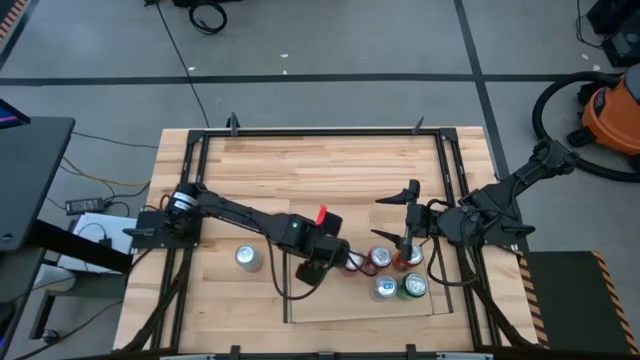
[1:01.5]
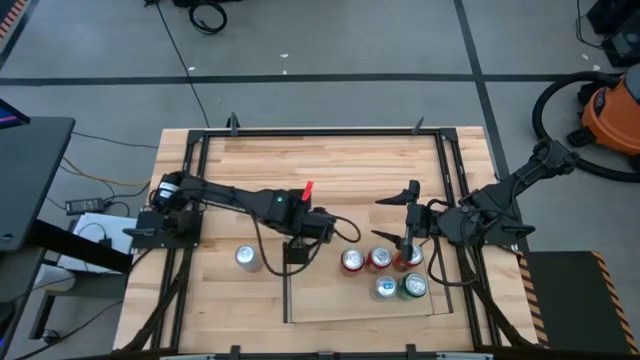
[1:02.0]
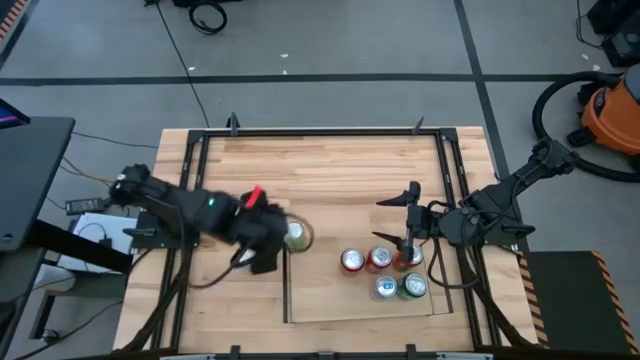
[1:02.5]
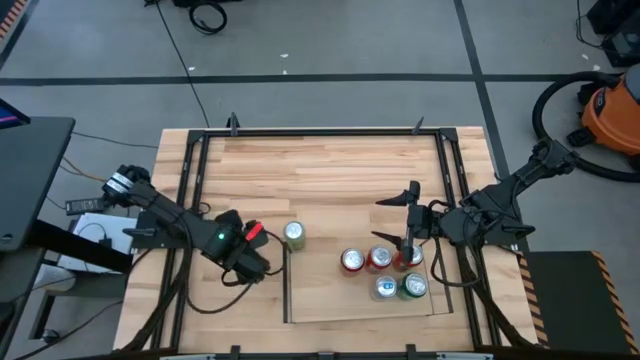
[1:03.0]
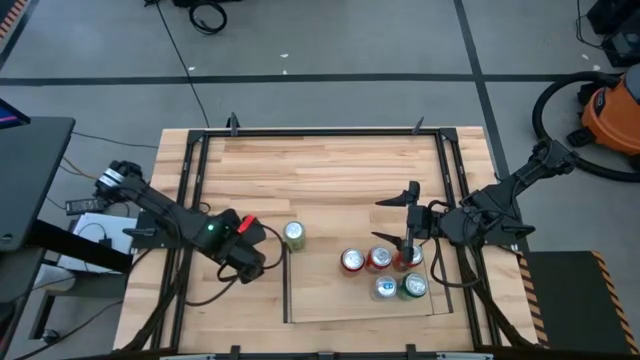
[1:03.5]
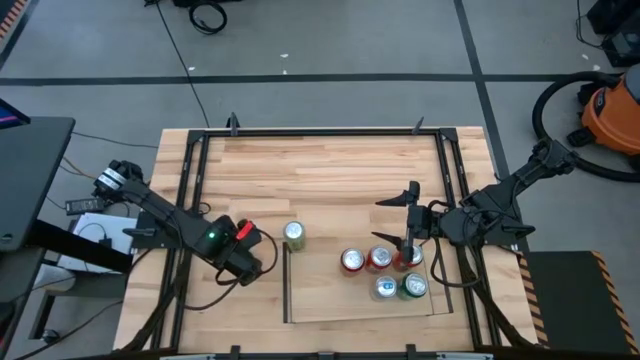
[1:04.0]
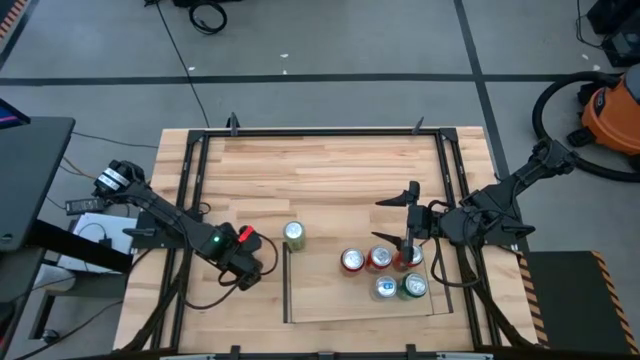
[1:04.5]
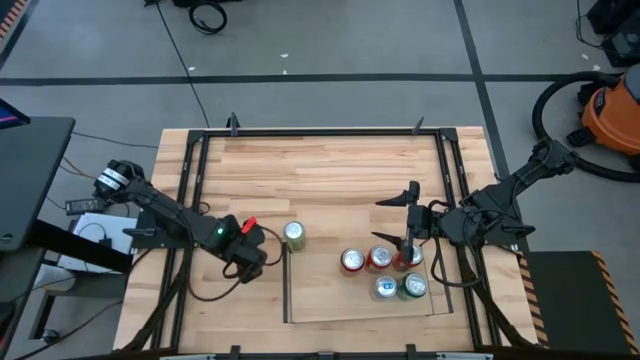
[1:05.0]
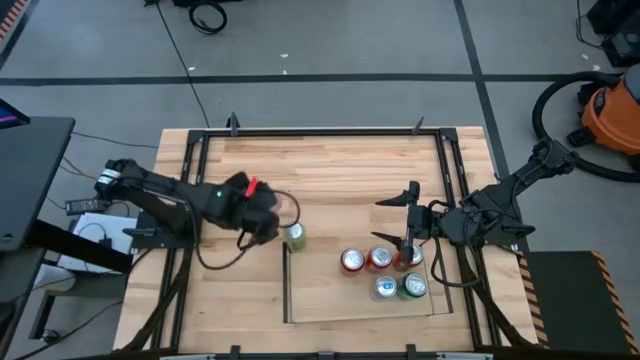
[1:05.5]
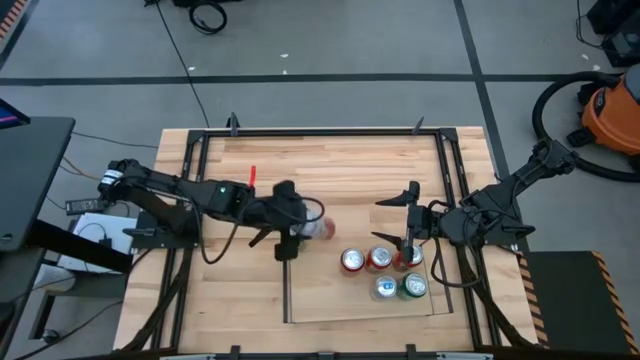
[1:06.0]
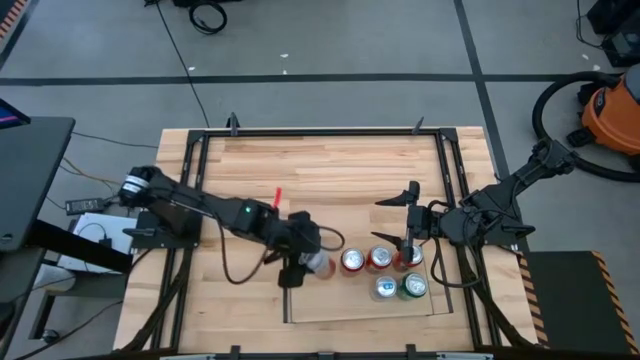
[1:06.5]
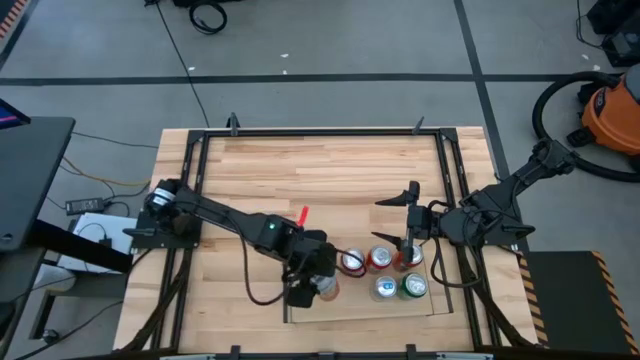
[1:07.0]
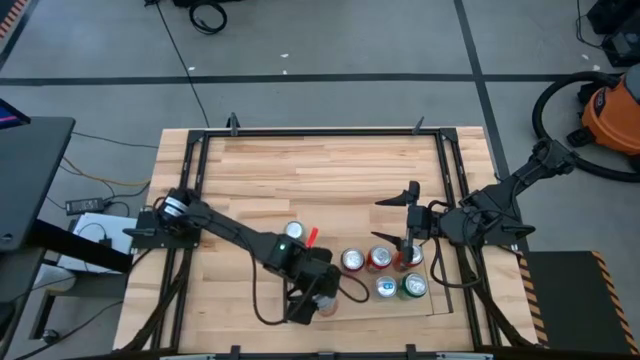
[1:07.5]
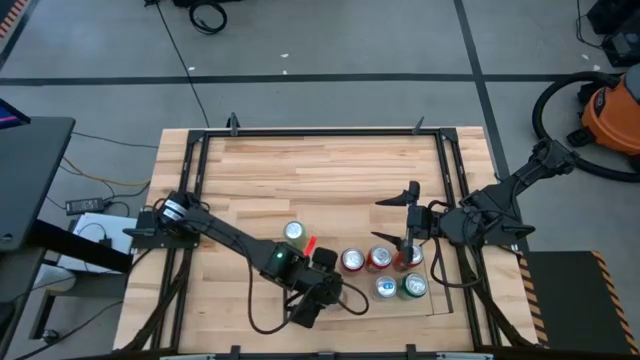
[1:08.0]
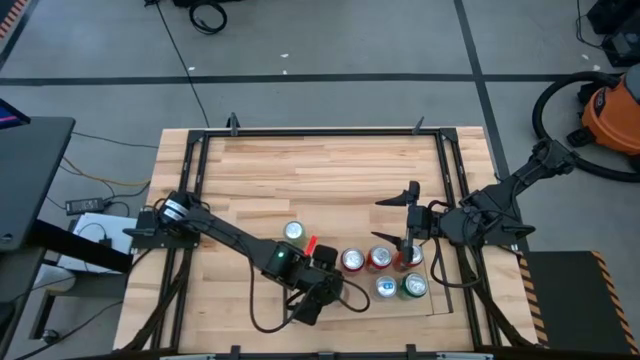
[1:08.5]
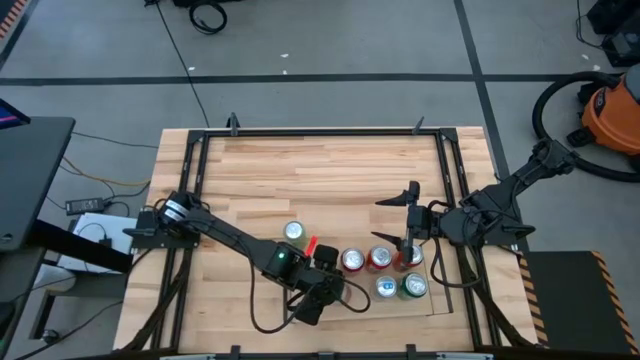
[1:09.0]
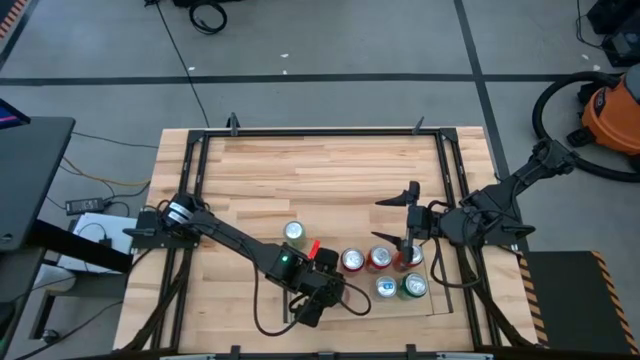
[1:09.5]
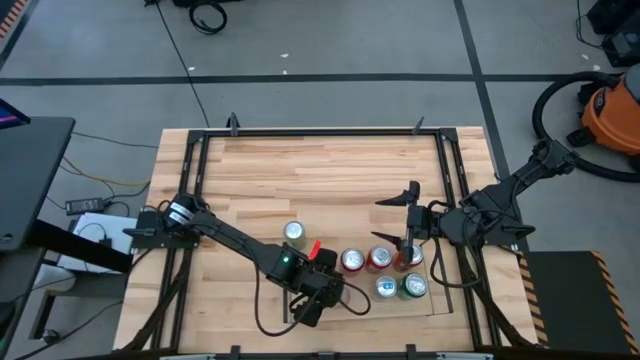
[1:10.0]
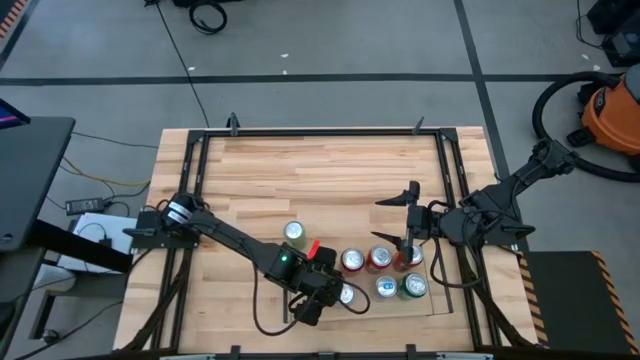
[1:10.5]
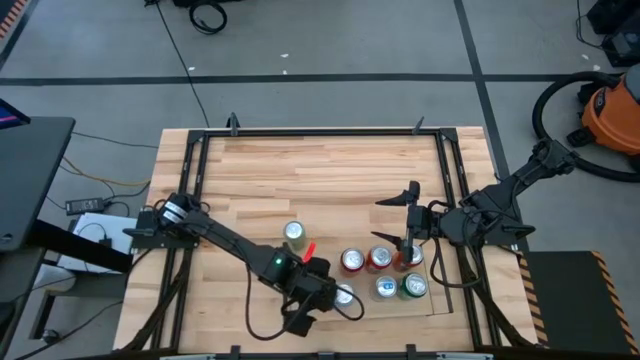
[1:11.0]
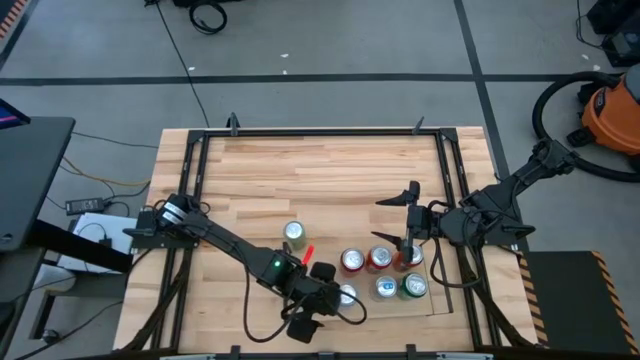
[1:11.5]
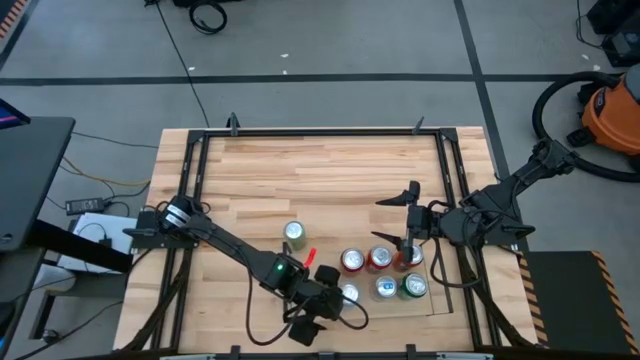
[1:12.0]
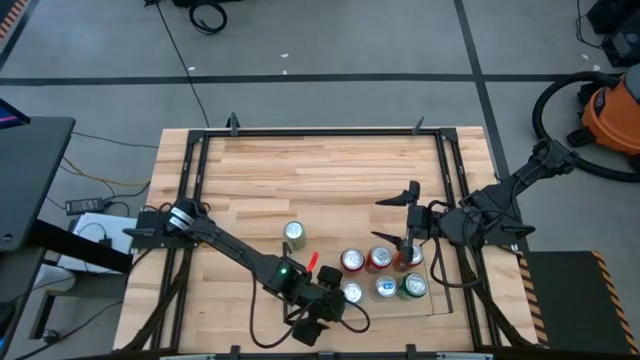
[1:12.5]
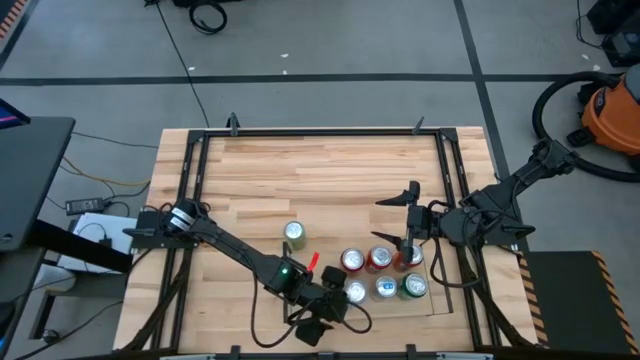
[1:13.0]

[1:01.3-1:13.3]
Task: Place canned beverage on shelf
Put the orange-white soda can on the shelf

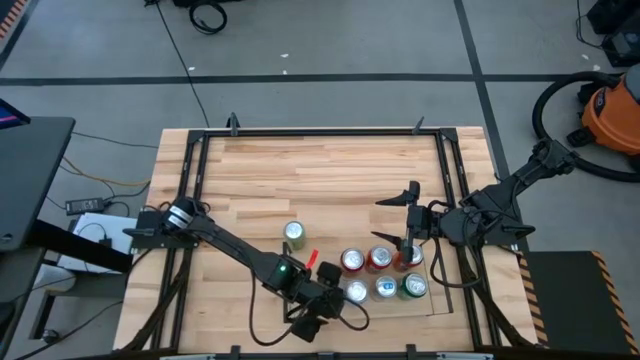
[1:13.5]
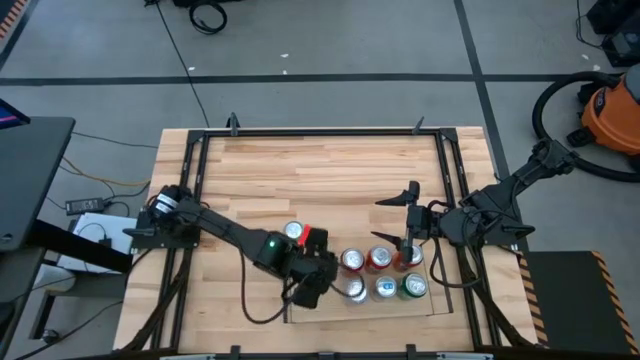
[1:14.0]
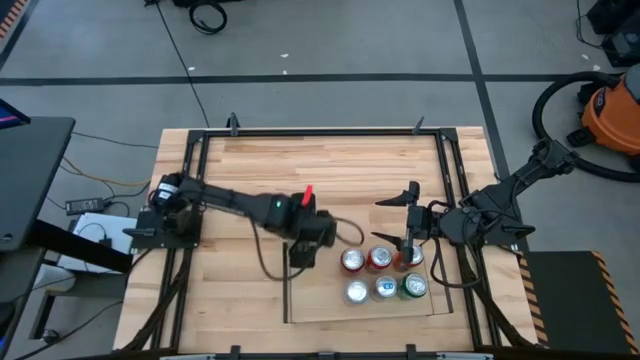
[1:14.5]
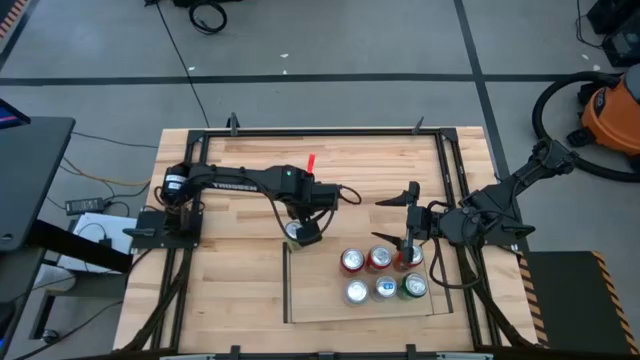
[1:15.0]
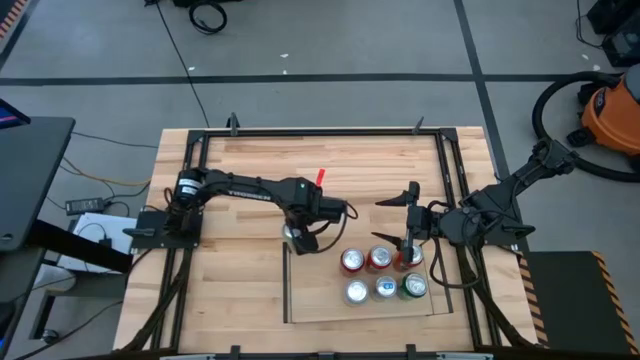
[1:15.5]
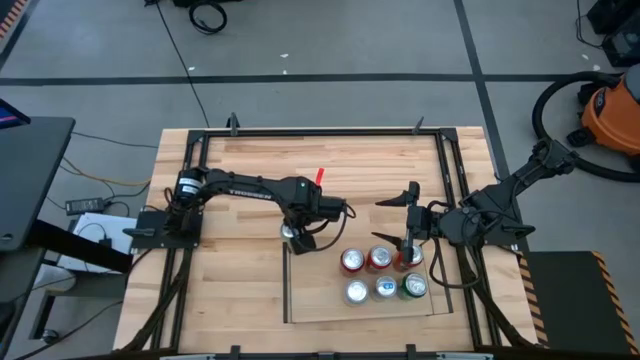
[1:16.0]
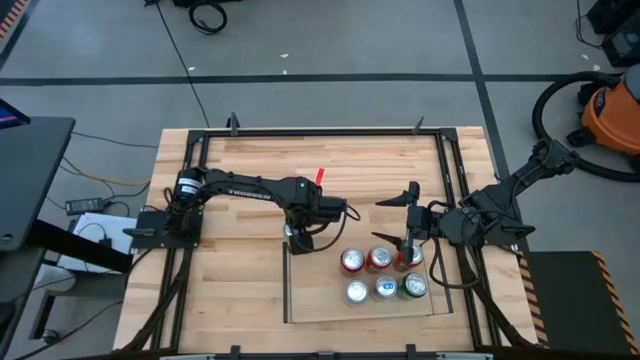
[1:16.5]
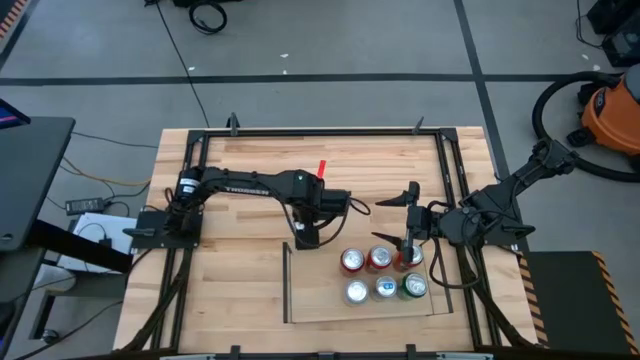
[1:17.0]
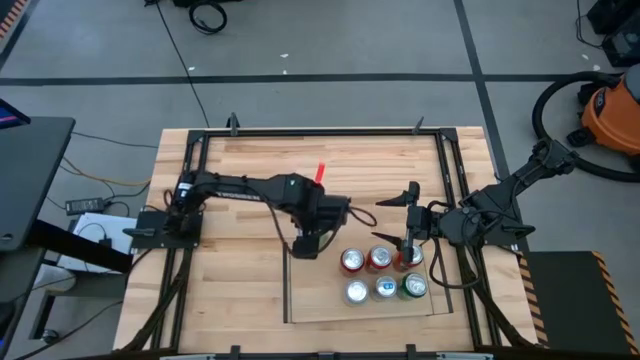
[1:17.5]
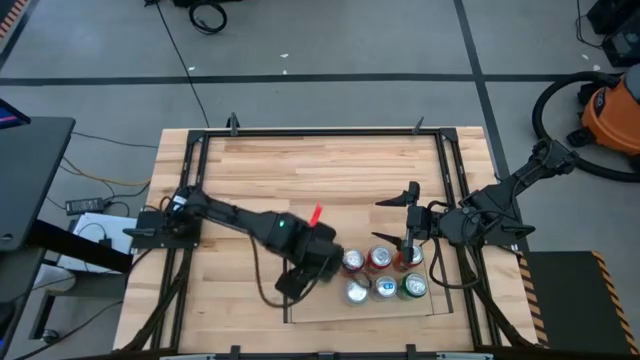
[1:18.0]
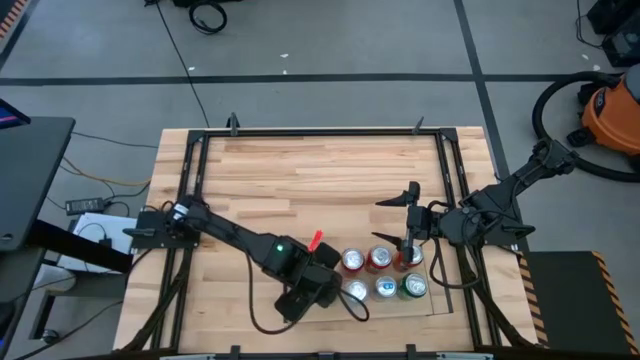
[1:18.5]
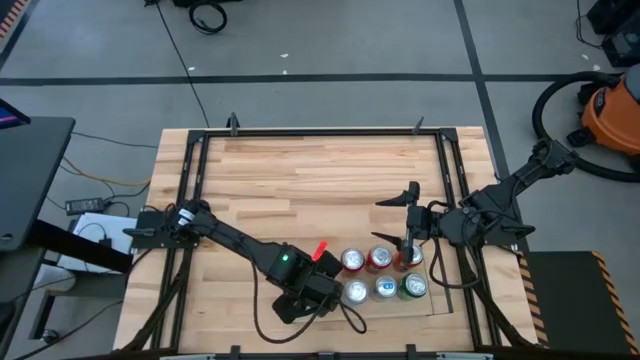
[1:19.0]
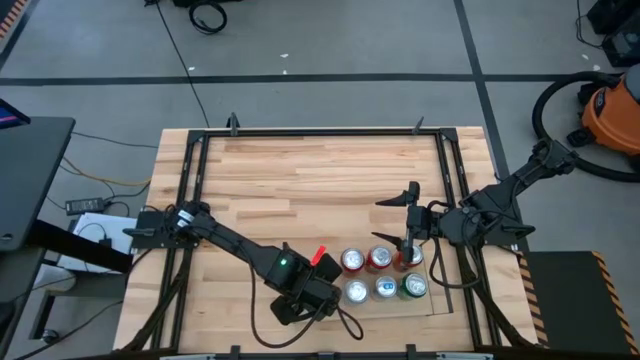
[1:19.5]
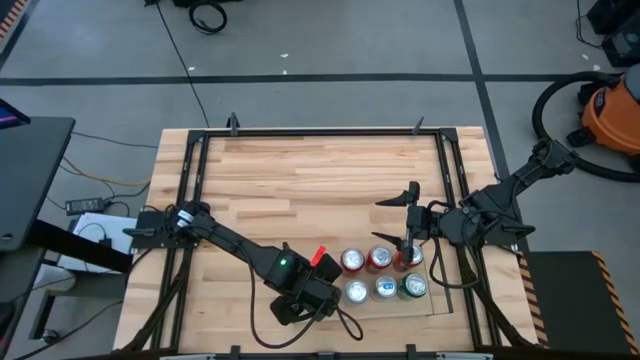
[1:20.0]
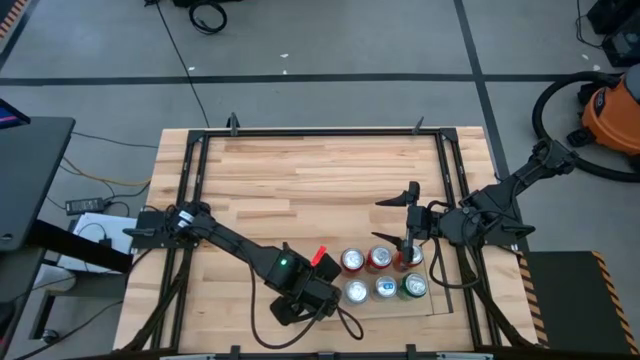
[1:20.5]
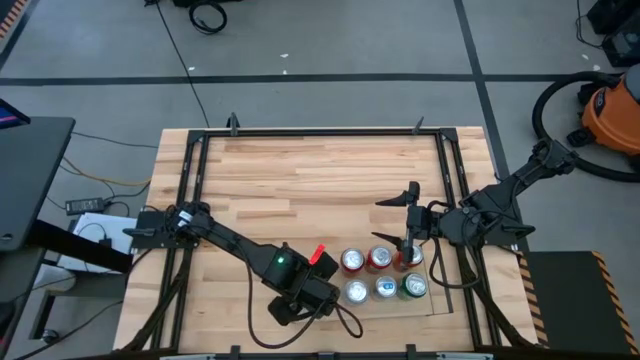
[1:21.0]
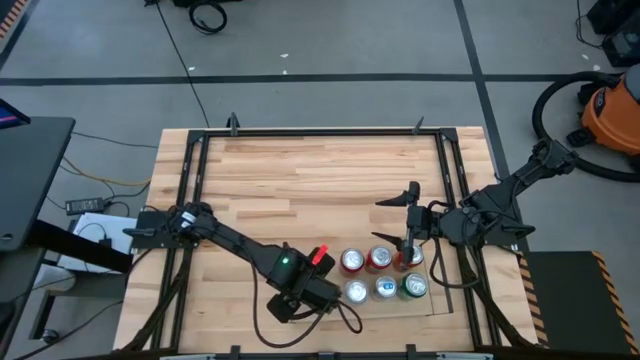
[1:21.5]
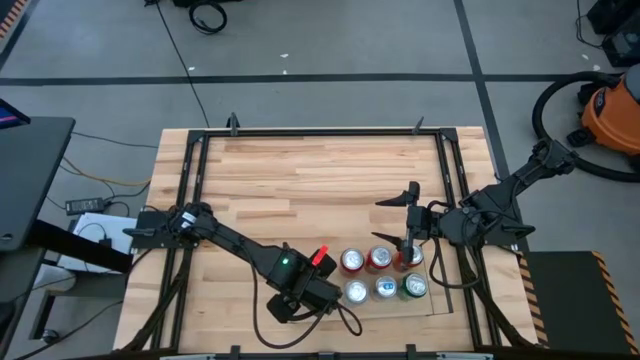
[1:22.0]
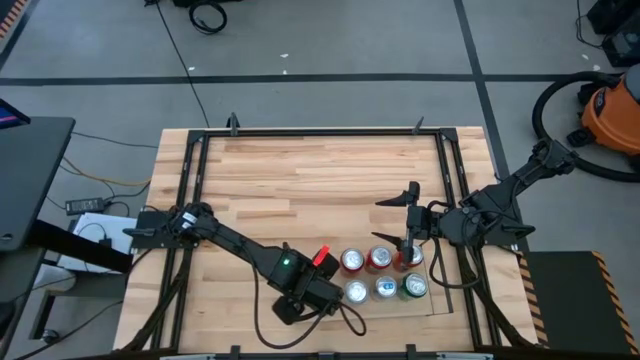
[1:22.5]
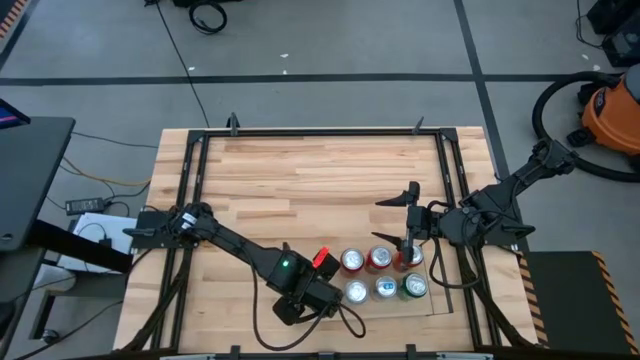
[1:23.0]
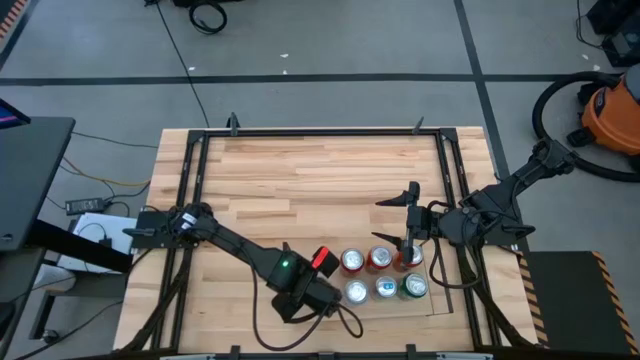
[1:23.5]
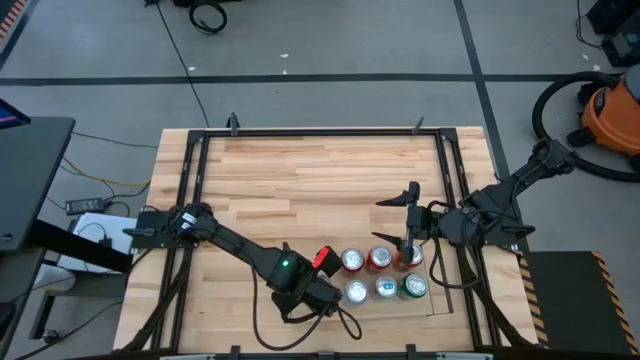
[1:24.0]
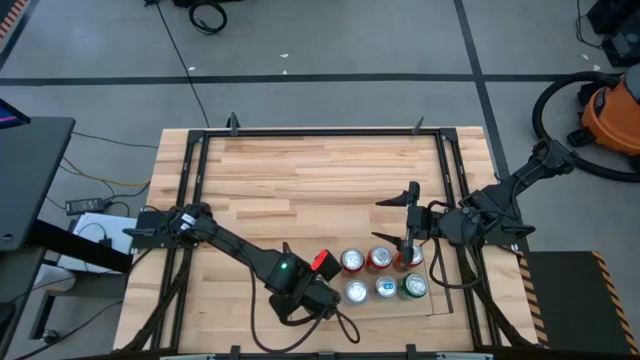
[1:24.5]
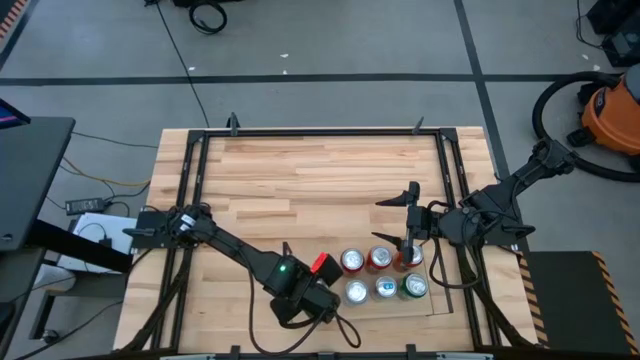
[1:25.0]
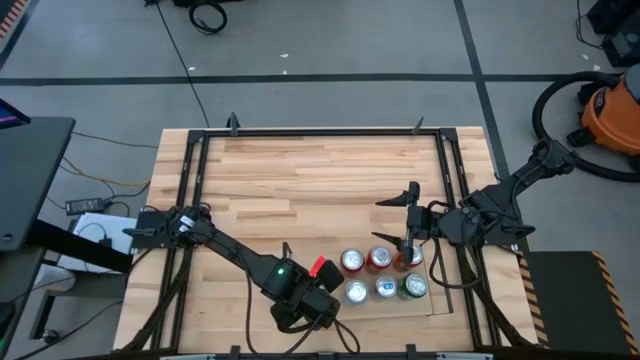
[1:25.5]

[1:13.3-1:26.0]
Put the light green soda can on the shelf
